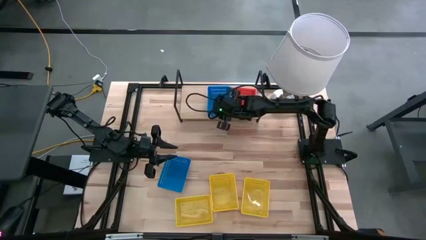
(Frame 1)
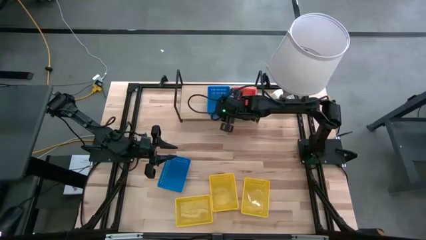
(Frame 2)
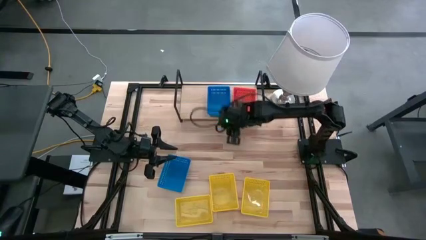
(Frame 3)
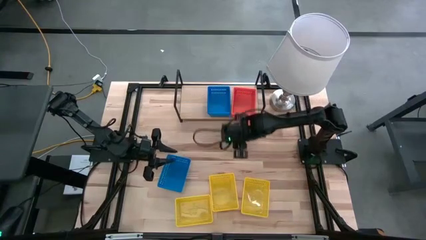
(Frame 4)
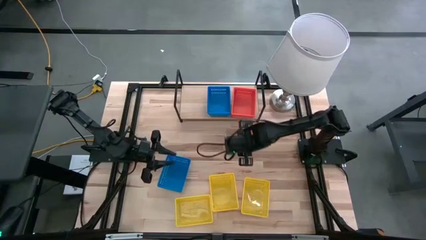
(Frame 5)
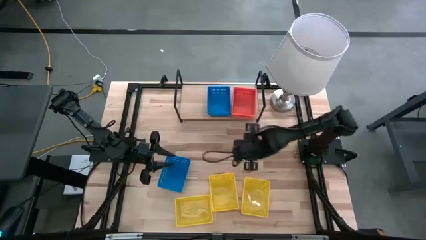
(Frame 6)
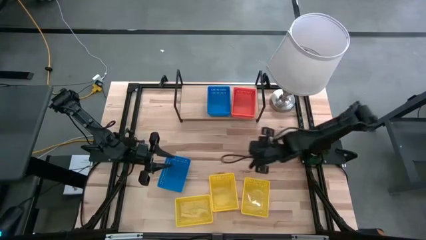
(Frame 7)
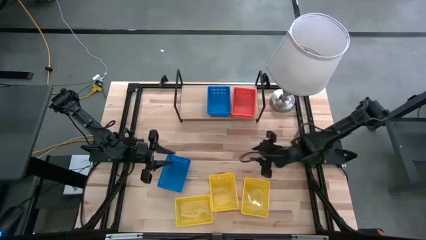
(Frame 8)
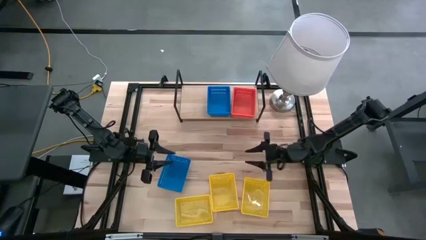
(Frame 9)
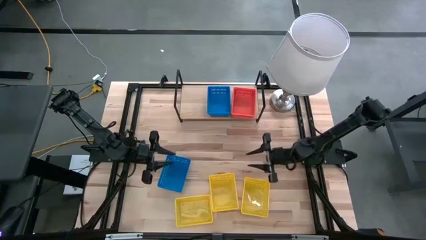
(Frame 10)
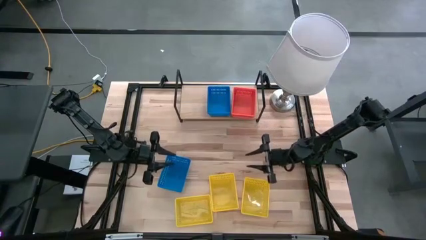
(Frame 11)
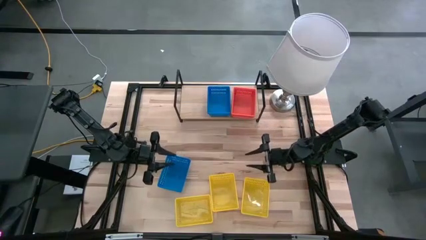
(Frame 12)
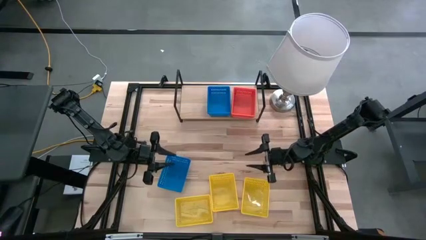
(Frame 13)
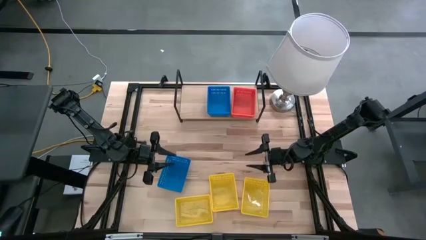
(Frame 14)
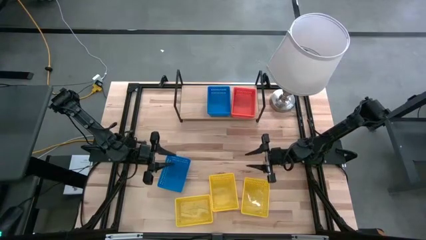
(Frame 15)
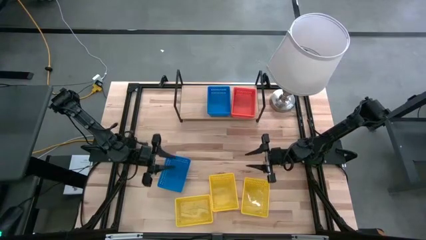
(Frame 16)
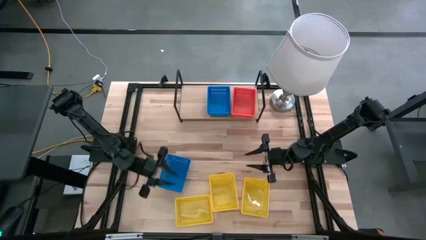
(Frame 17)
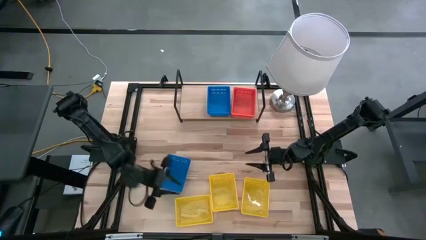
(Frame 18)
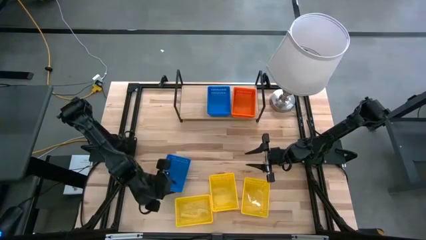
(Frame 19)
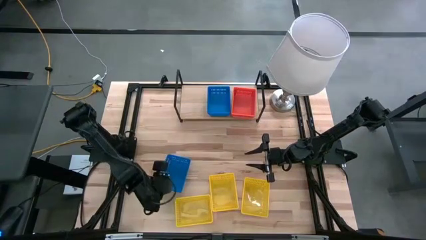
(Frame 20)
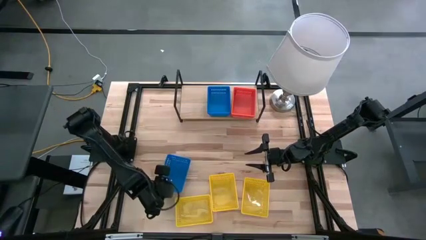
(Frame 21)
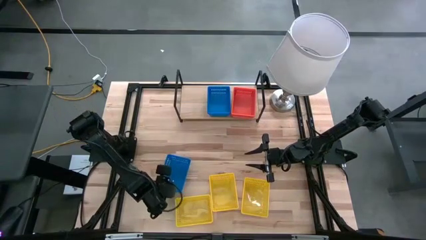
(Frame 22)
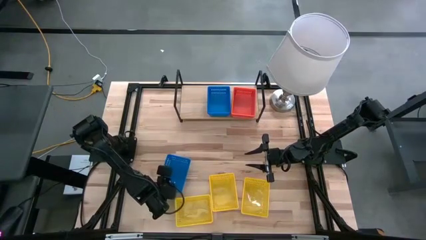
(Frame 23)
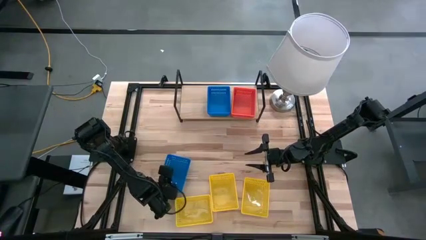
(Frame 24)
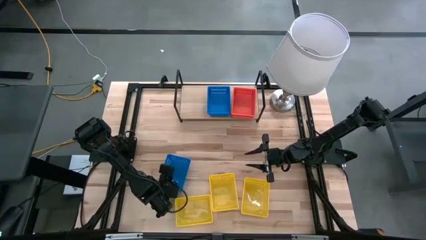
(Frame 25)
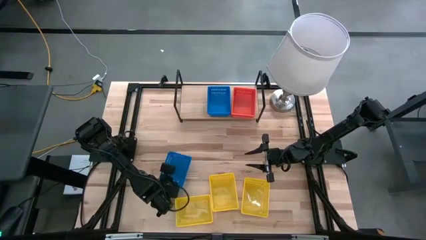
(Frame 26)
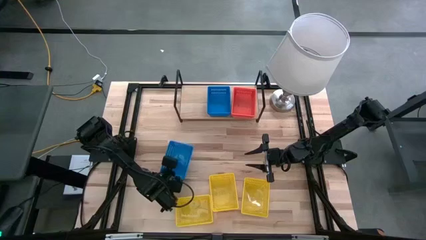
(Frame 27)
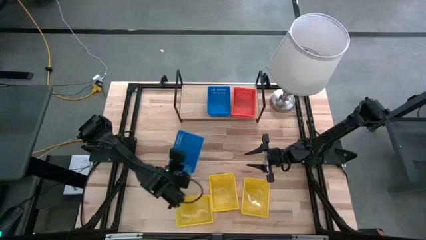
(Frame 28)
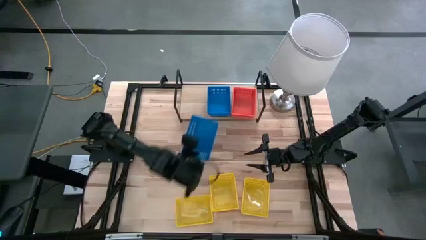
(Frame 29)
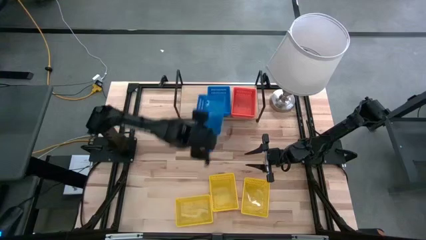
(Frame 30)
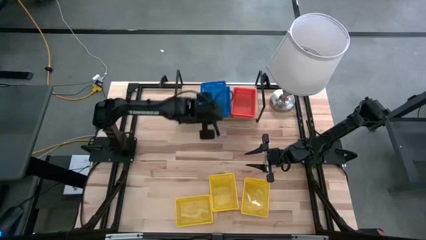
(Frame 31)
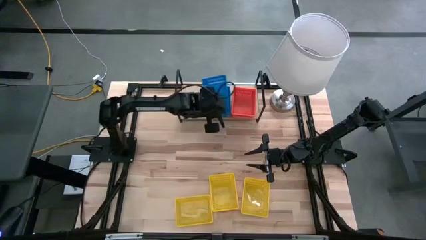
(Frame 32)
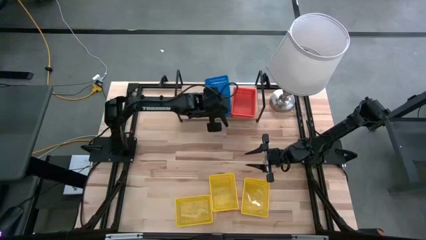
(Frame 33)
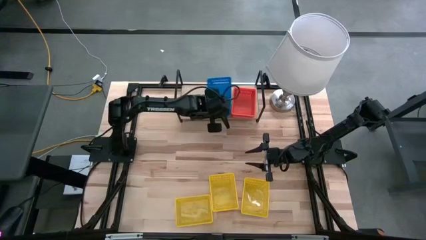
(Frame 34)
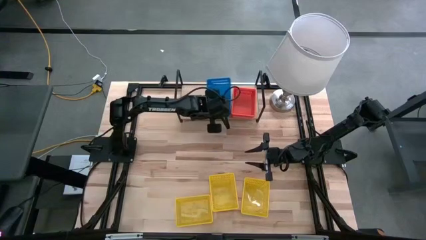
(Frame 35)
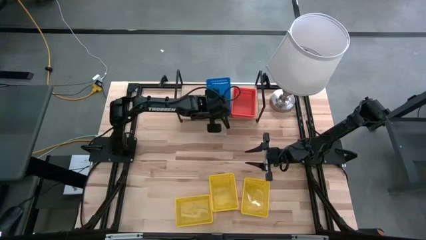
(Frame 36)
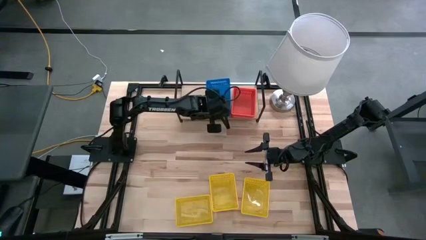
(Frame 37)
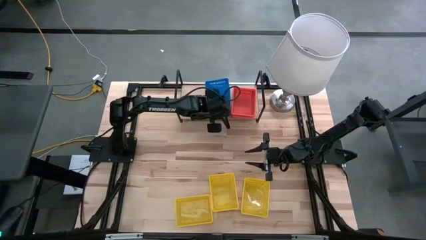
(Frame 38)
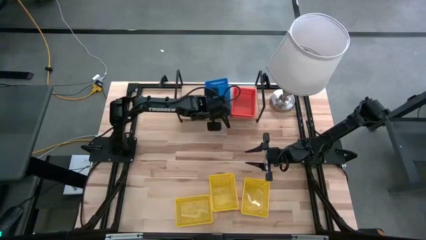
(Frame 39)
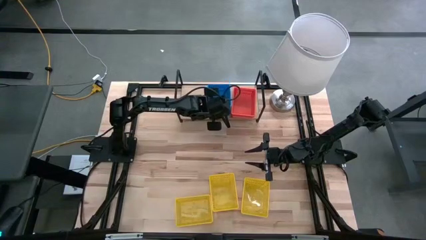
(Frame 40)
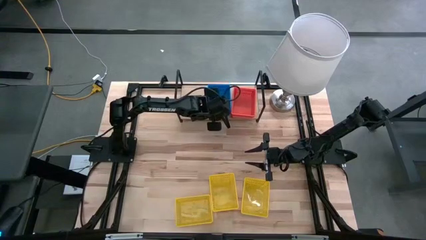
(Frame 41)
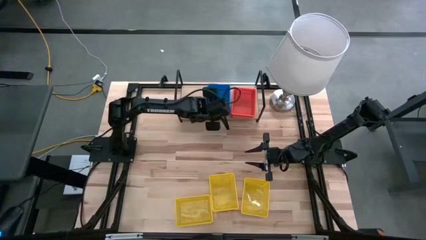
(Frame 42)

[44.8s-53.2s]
Task: Stack baskets on shelf by color
Stack the blue bin on top of the other blue bins on the shelf

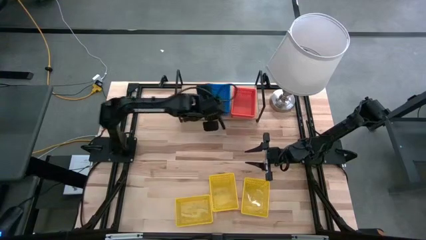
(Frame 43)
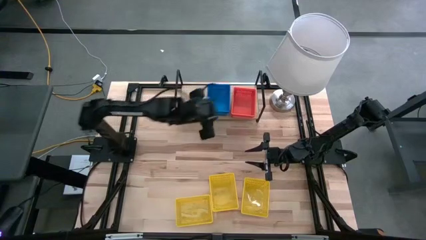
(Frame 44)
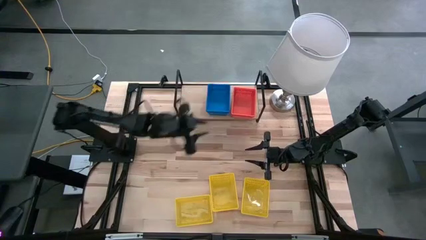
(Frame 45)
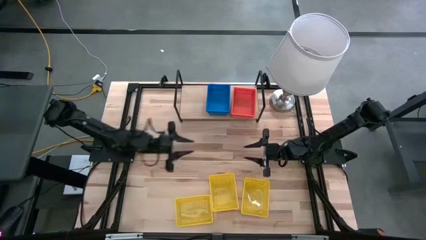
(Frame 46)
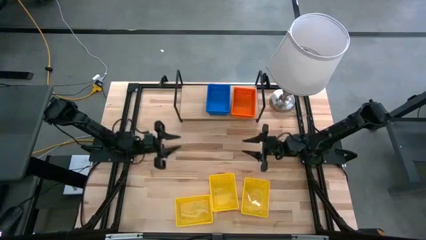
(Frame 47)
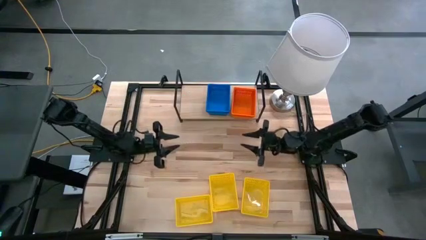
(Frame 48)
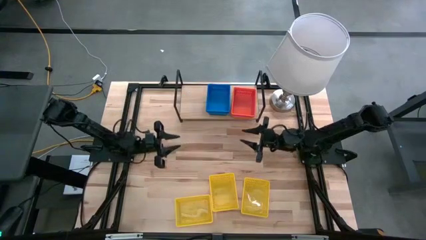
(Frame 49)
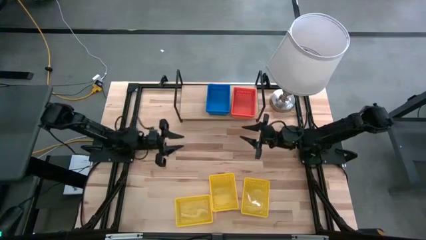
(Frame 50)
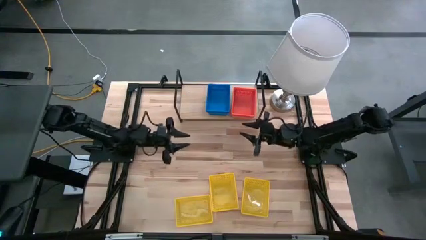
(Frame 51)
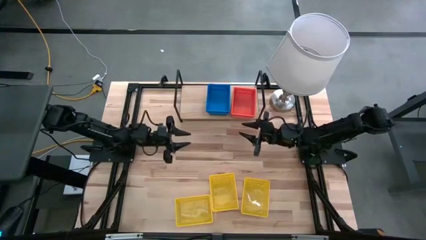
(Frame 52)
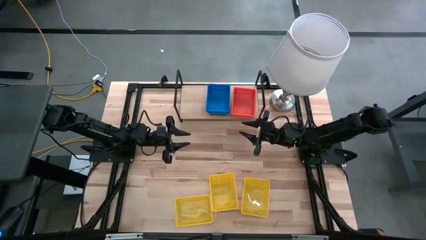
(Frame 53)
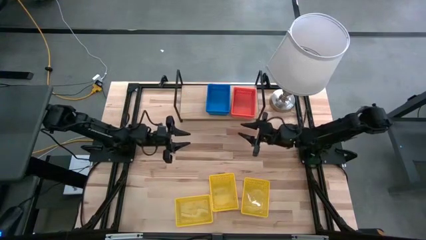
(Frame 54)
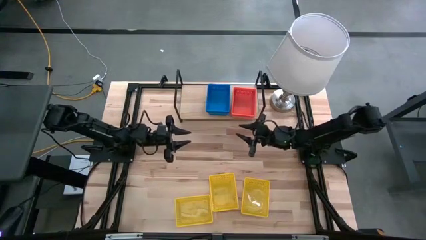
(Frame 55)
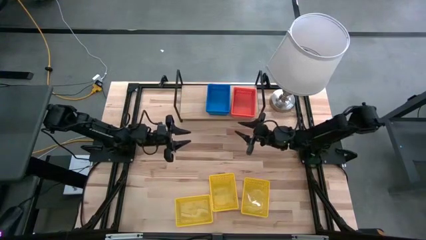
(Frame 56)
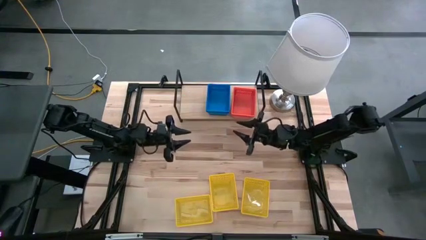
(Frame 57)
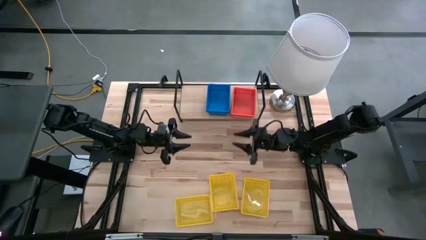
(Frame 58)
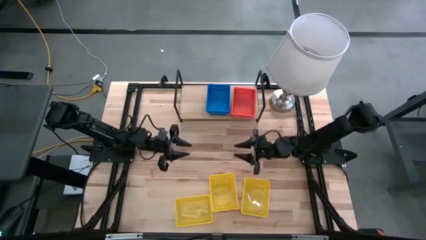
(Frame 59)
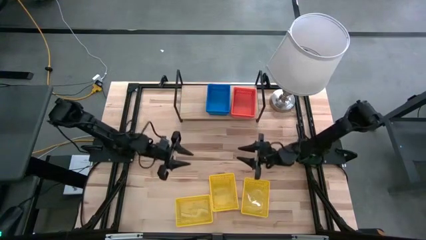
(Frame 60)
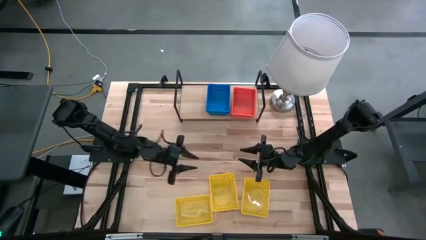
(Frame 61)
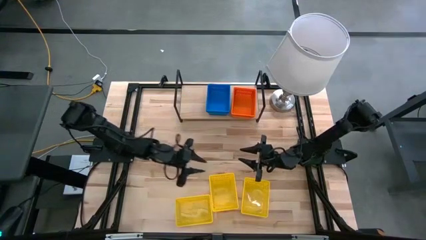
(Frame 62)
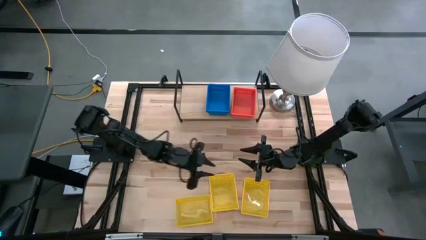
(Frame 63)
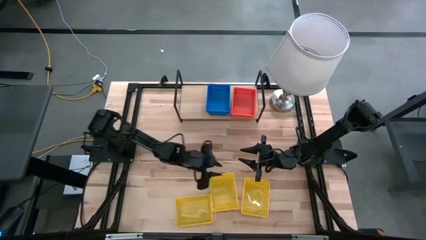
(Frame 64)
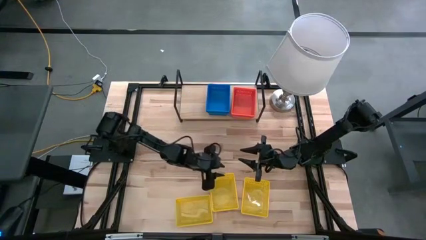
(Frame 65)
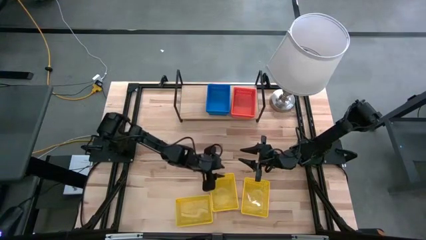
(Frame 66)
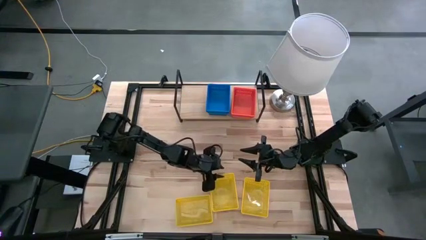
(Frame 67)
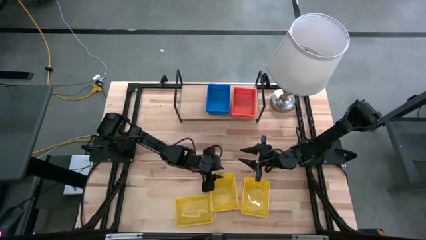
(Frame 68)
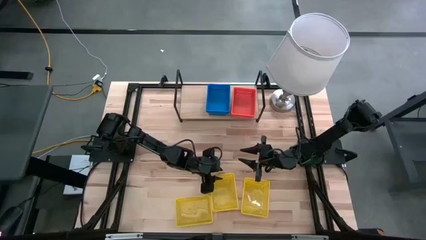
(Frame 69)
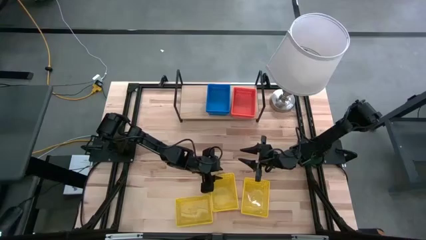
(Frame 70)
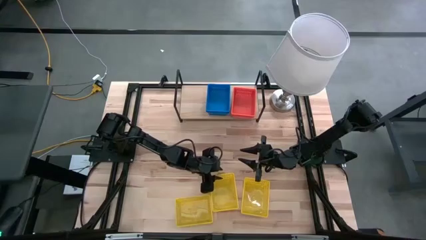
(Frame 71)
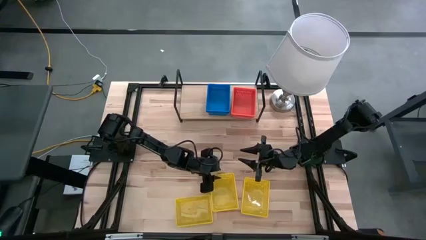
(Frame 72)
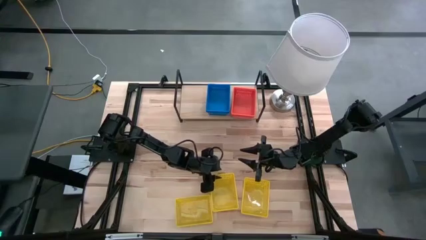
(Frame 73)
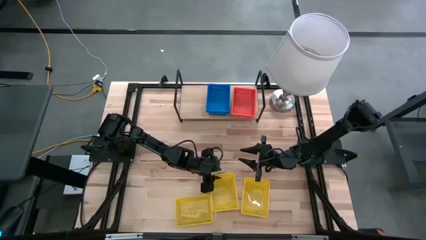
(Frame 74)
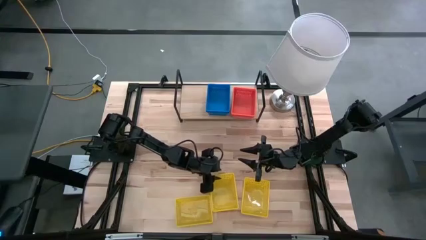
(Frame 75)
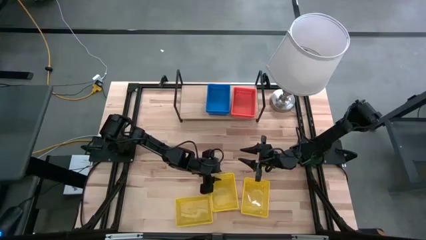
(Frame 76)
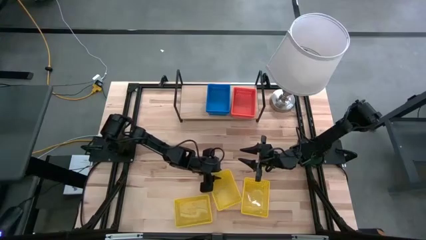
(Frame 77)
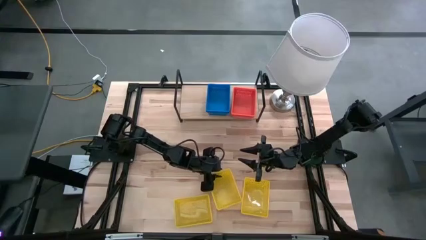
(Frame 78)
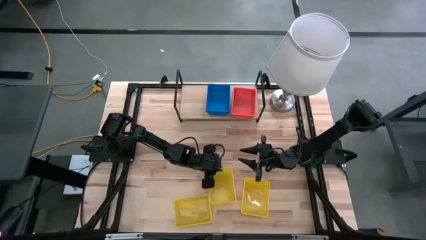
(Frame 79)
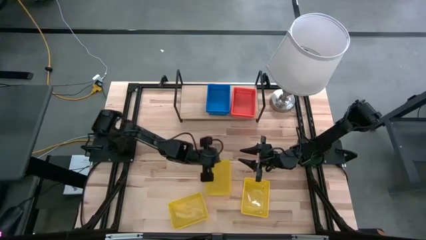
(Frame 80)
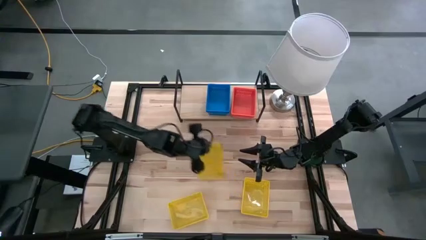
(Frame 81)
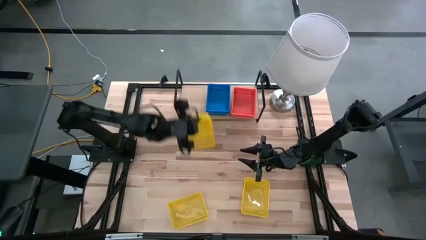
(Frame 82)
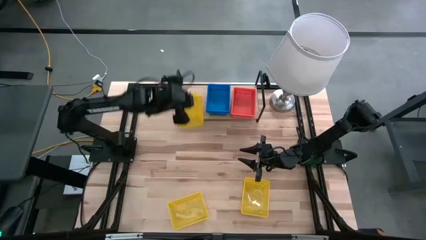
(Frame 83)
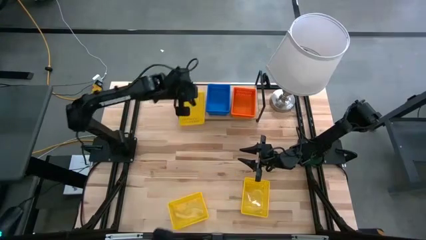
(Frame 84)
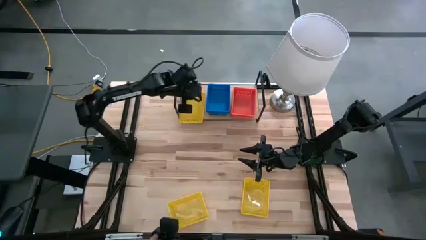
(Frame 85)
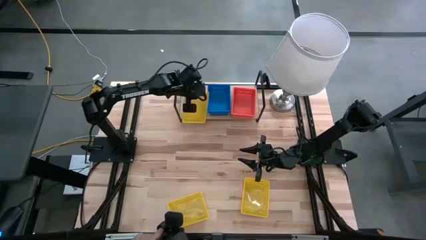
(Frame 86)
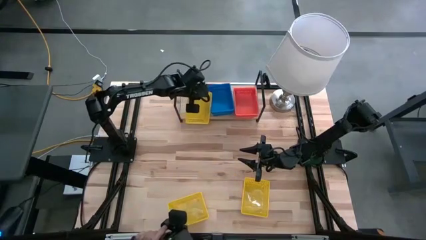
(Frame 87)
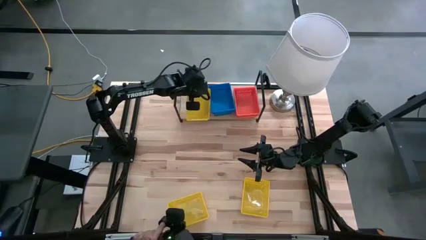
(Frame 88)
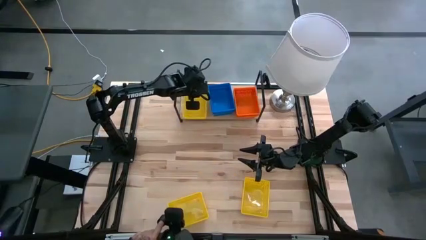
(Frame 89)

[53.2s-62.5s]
Put the middle yellow bin on the shelf
